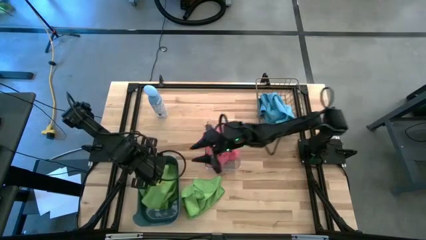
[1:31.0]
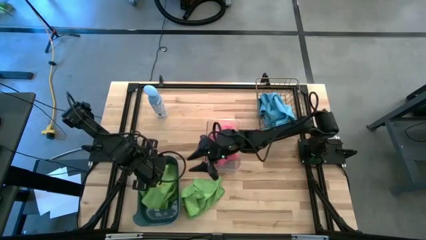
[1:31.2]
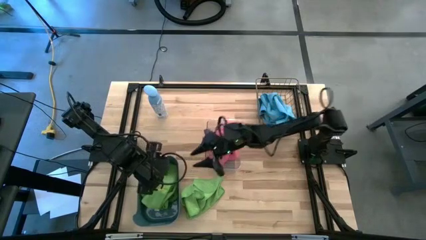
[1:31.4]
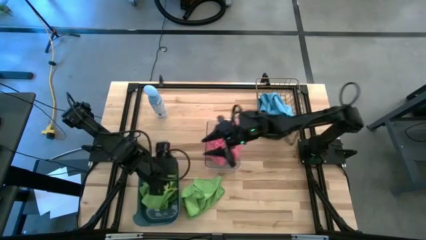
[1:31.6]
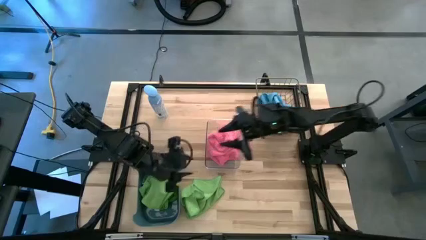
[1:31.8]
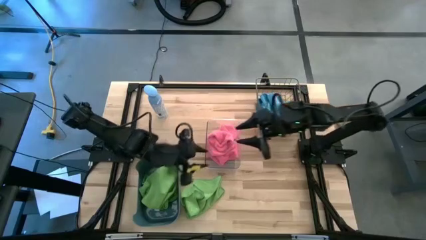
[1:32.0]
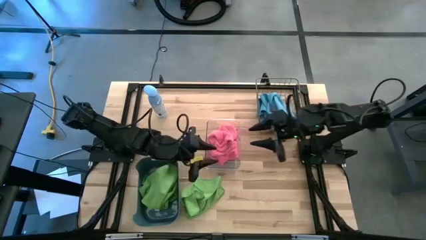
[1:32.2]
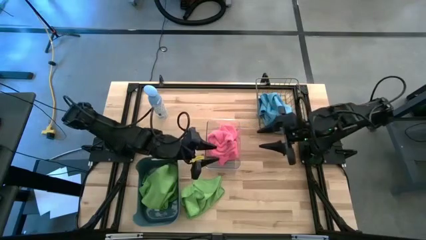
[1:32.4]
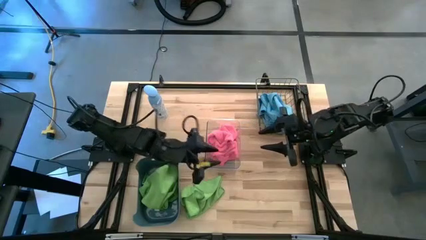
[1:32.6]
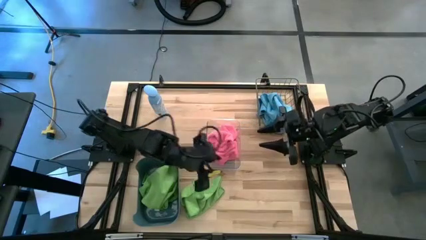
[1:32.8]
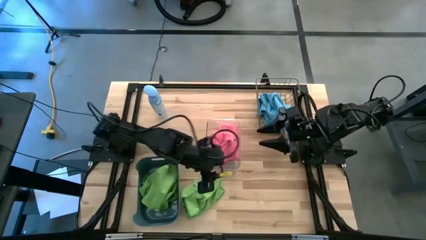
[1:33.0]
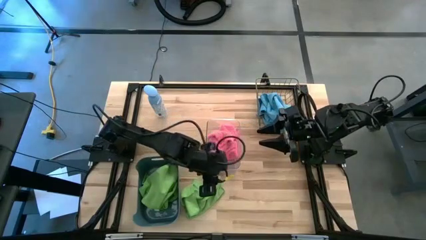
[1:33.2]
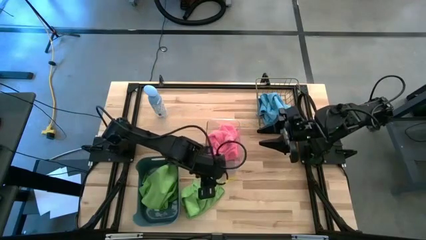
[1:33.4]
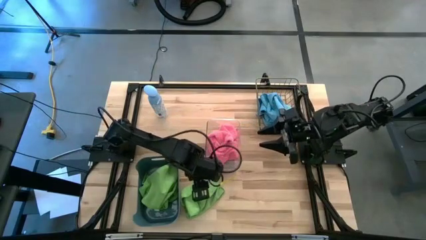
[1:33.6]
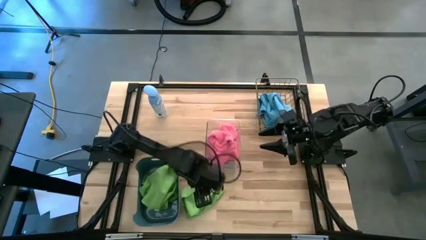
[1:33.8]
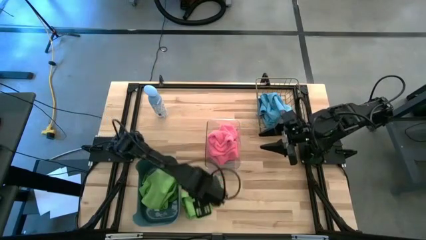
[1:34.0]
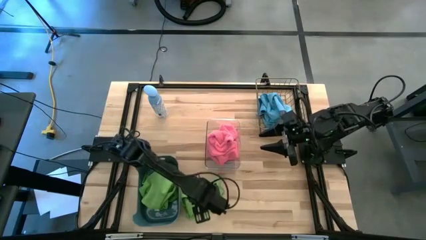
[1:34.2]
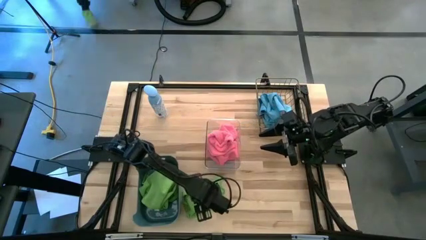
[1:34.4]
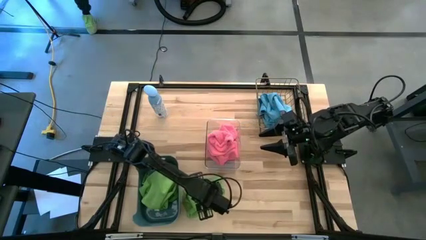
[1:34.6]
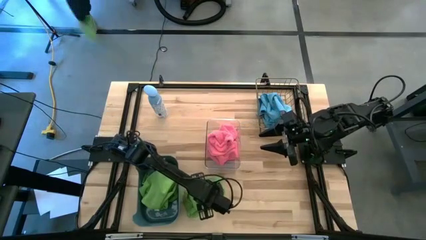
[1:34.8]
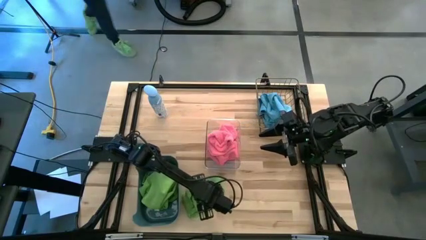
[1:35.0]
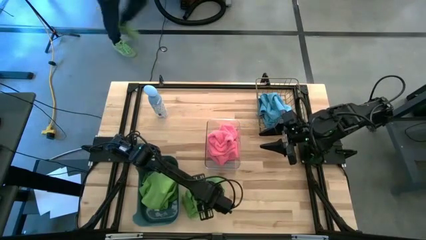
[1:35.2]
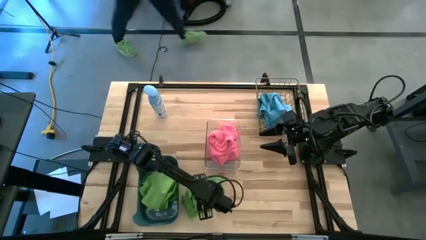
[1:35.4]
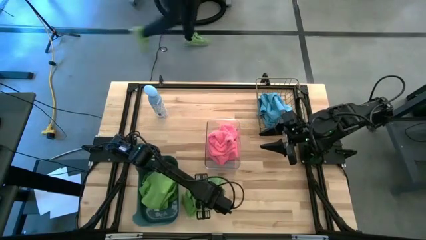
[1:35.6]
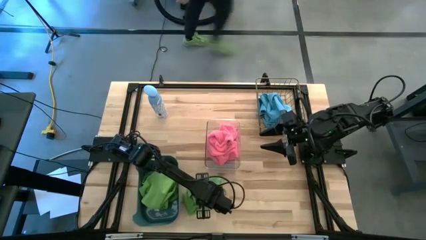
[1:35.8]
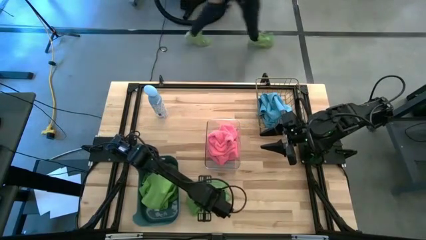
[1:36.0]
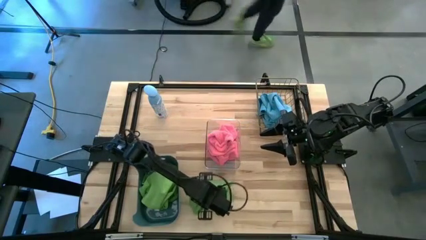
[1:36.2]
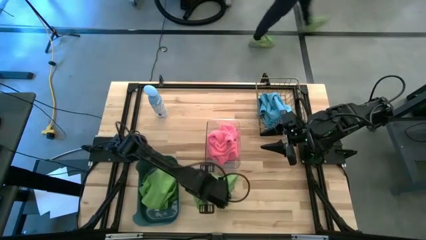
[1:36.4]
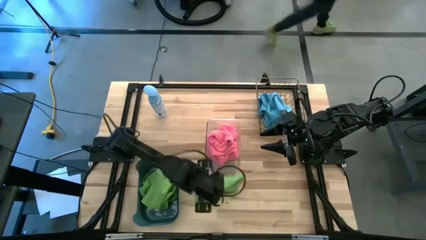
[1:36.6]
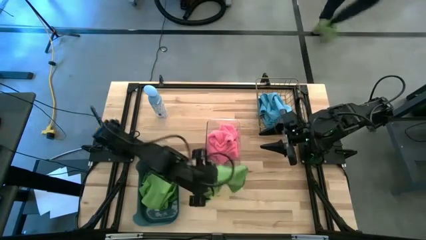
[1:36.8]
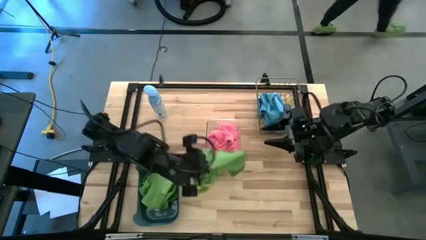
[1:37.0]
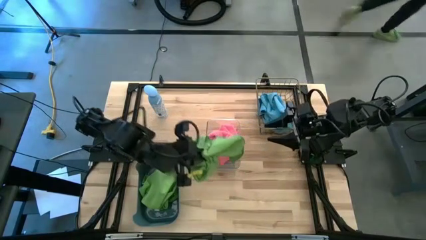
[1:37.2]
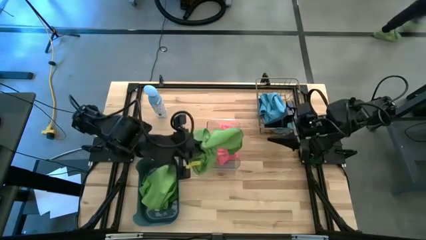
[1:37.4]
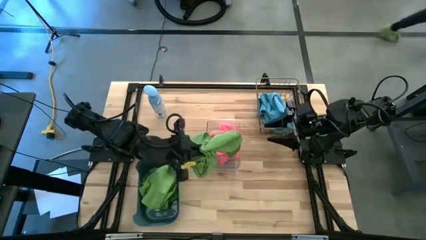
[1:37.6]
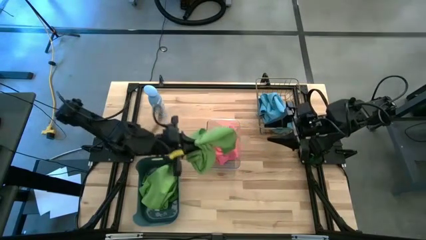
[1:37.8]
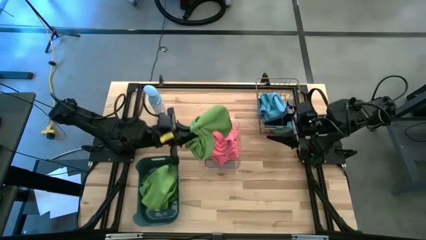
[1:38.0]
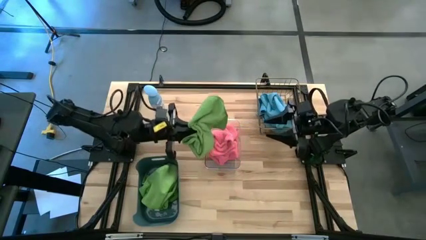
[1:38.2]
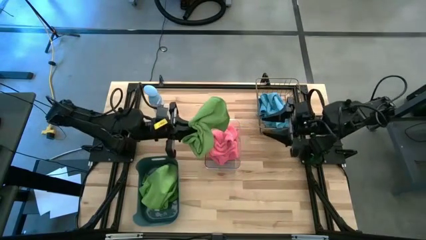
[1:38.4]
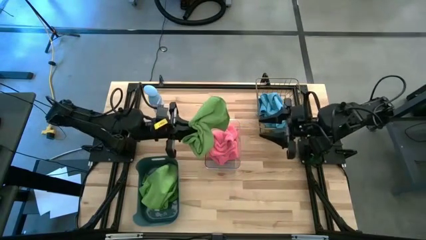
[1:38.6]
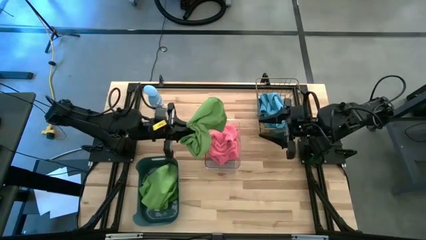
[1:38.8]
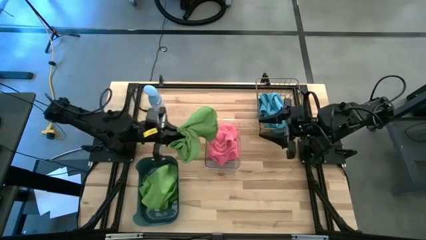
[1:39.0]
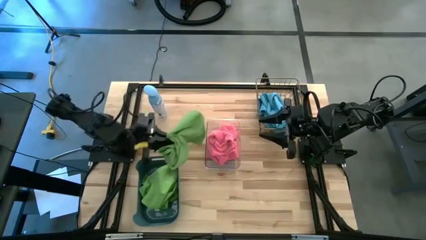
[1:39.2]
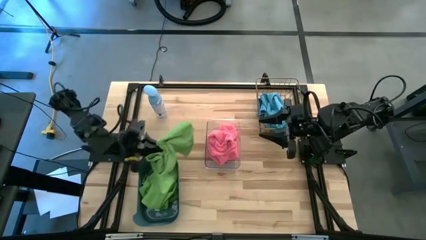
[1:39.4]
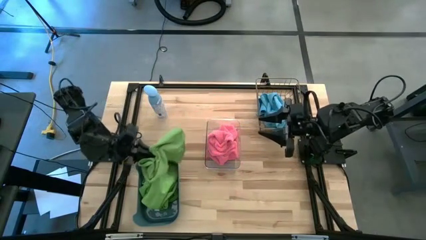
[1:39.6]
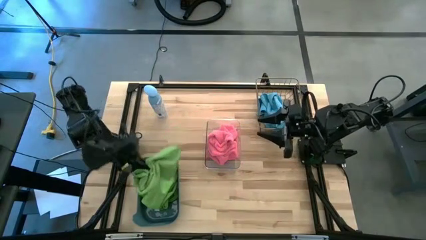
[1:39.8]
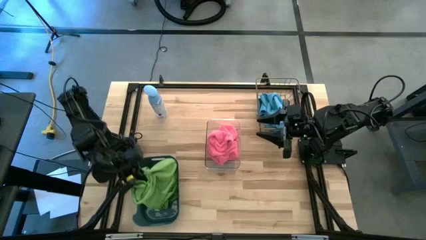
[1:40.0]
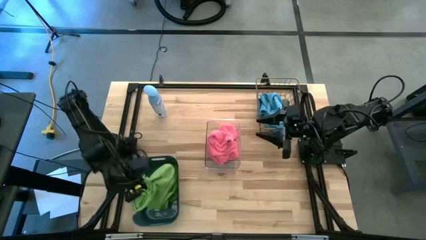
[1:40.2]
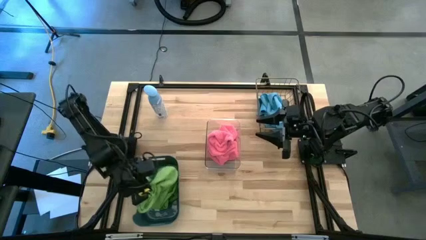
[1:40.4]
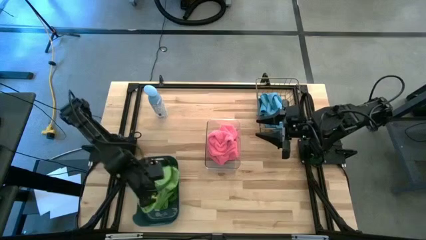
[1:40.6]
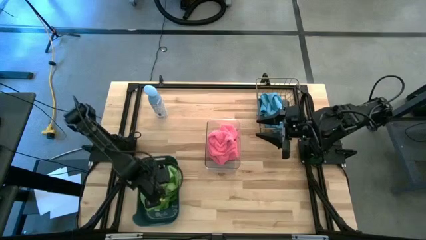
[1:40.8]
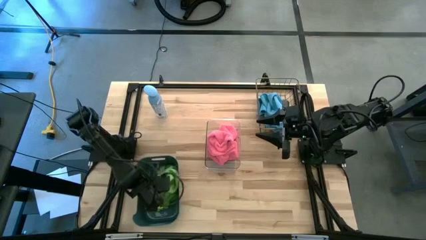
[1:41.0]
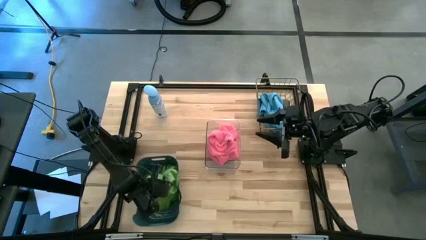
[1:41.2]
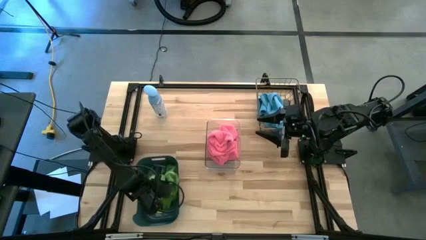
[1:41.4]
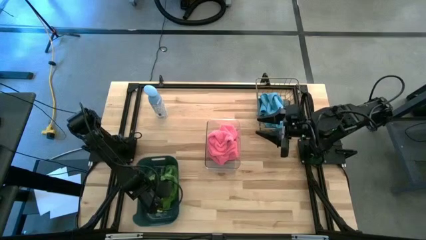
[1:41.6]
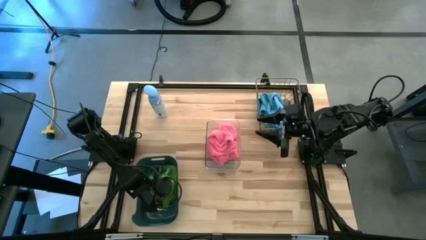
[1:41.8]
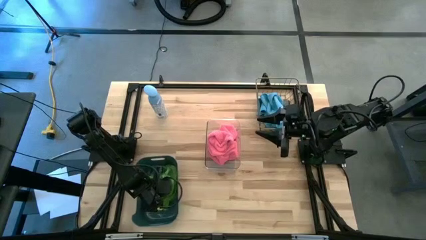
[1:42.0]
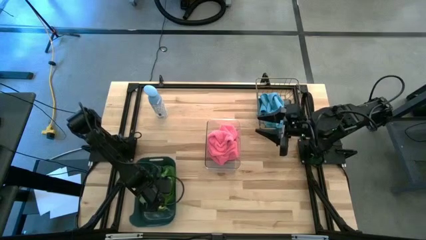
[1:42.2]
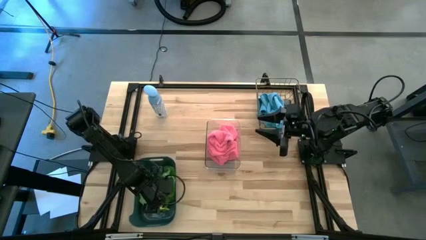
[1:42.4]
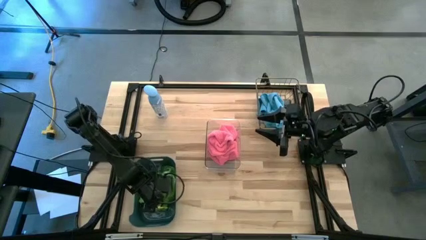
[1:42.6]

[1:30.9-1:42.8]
Task: Sort microfiber towel by color & place in baskets
Put the green microfiber cloth into the blue bin
